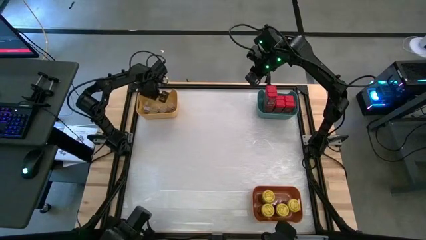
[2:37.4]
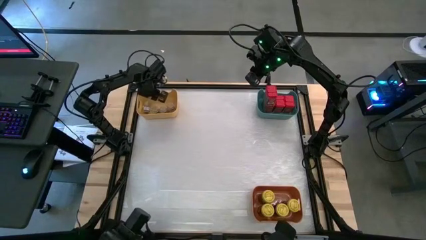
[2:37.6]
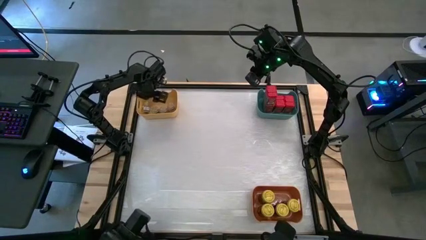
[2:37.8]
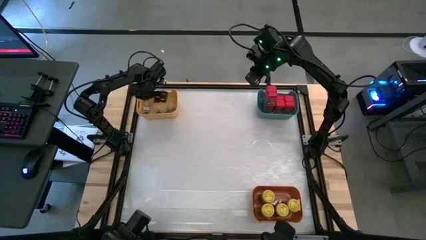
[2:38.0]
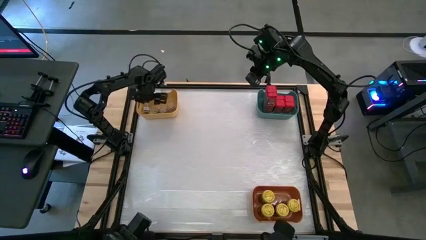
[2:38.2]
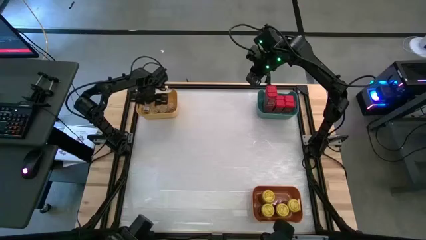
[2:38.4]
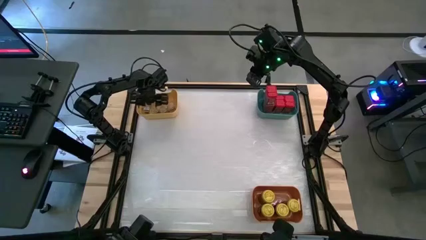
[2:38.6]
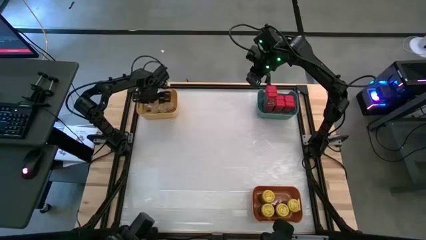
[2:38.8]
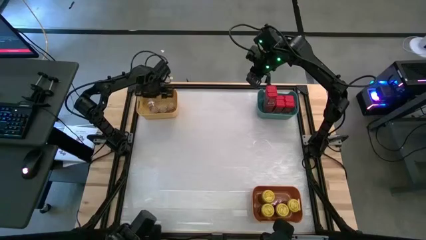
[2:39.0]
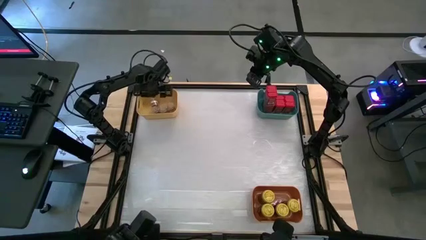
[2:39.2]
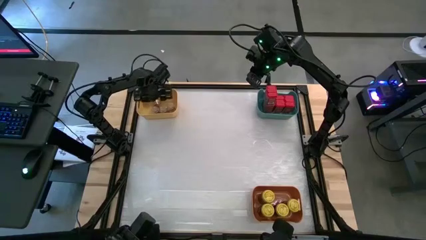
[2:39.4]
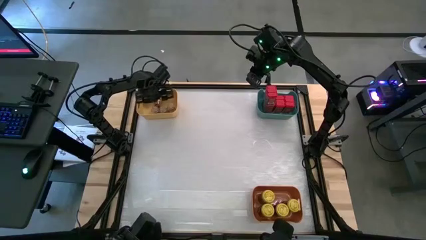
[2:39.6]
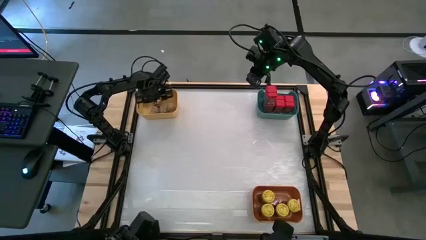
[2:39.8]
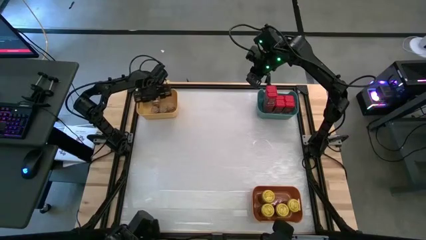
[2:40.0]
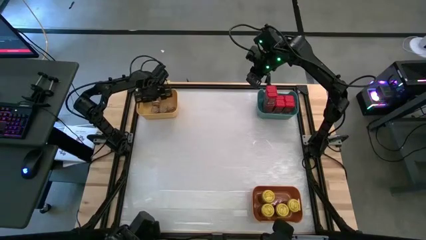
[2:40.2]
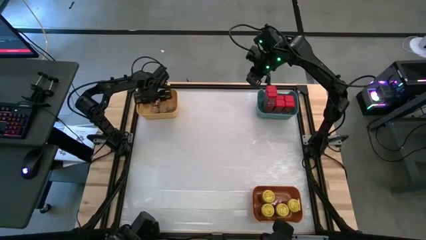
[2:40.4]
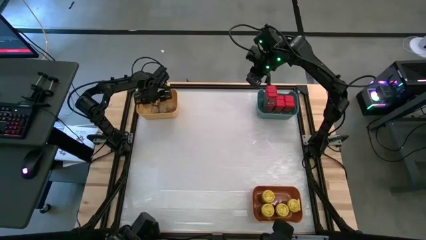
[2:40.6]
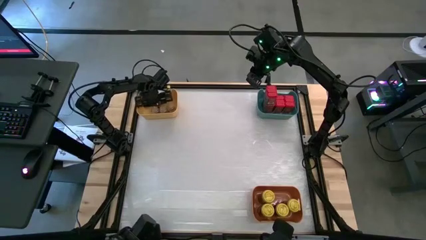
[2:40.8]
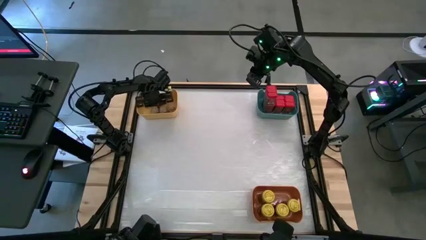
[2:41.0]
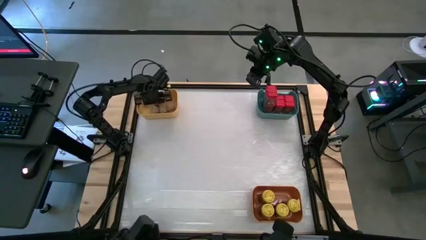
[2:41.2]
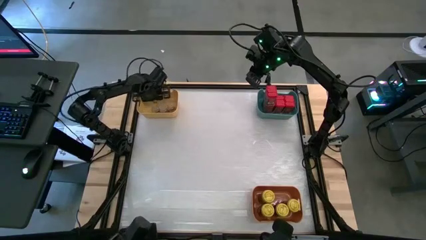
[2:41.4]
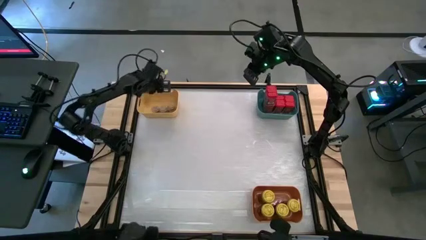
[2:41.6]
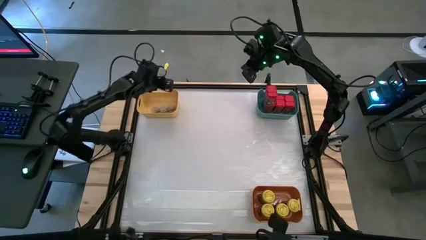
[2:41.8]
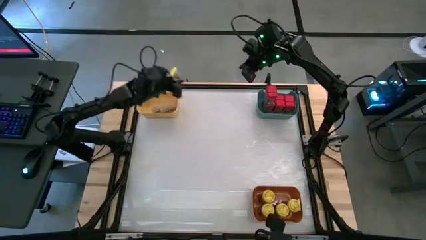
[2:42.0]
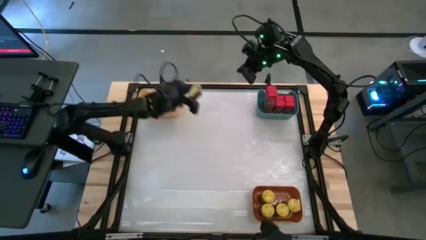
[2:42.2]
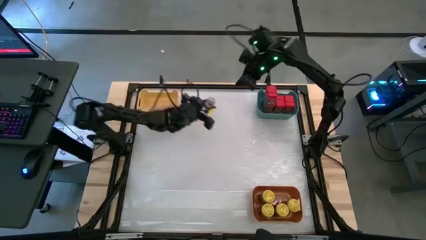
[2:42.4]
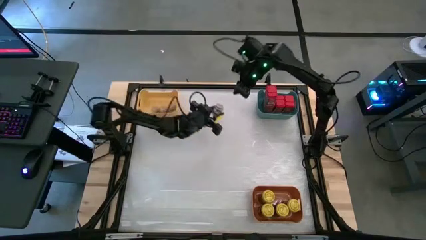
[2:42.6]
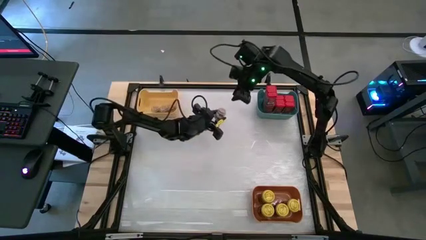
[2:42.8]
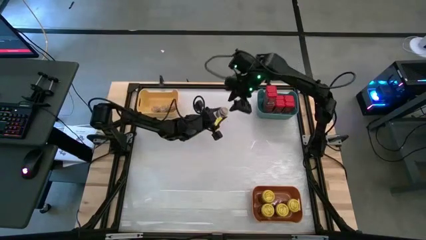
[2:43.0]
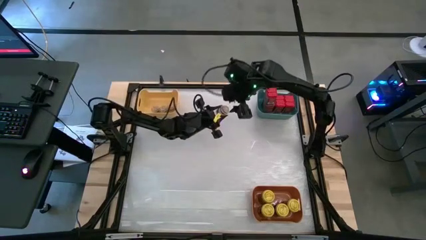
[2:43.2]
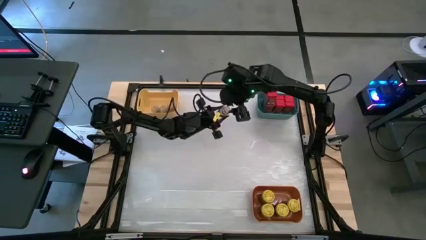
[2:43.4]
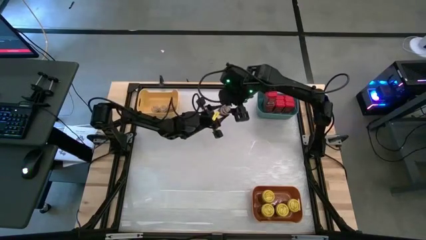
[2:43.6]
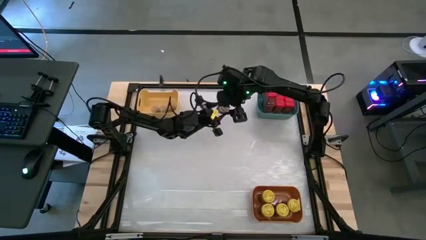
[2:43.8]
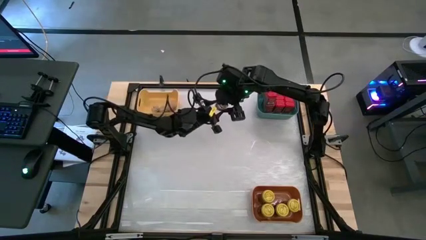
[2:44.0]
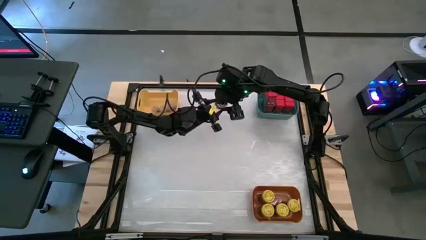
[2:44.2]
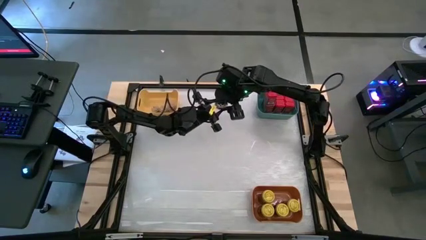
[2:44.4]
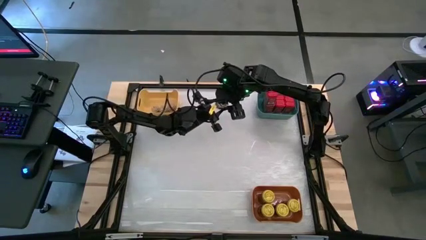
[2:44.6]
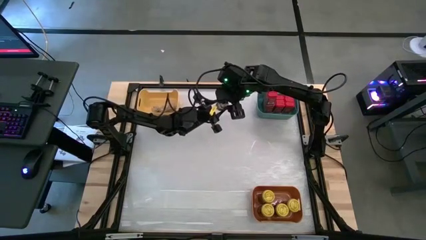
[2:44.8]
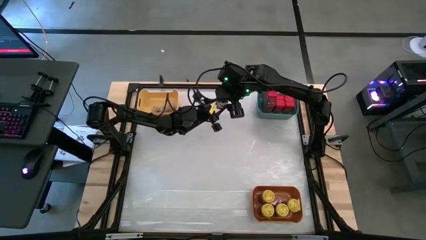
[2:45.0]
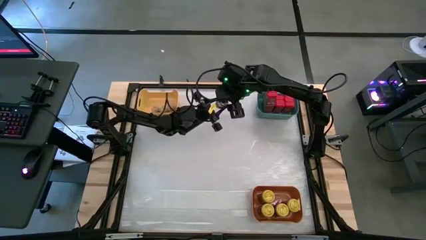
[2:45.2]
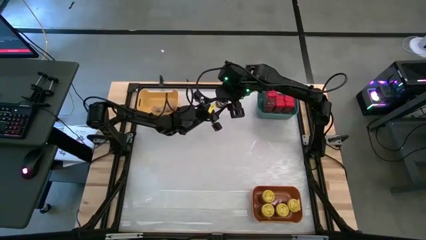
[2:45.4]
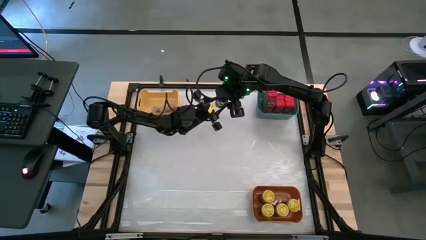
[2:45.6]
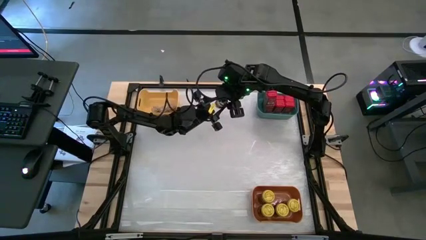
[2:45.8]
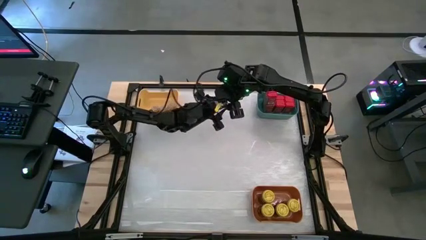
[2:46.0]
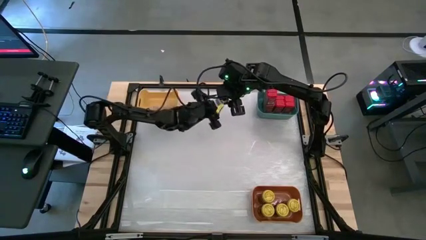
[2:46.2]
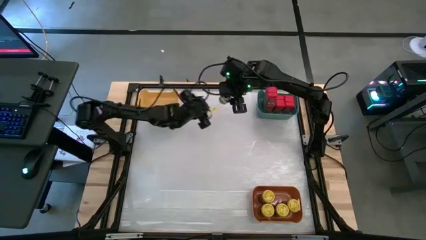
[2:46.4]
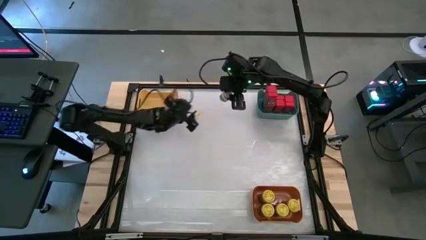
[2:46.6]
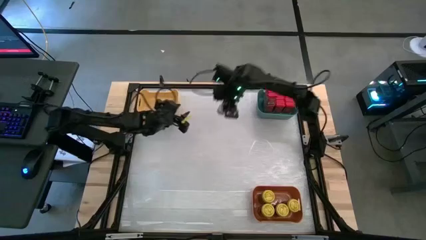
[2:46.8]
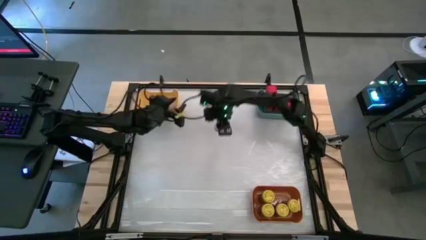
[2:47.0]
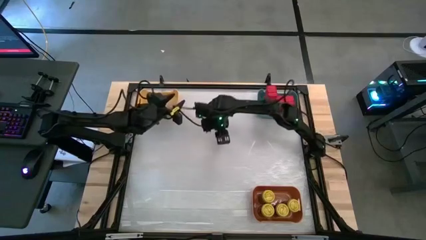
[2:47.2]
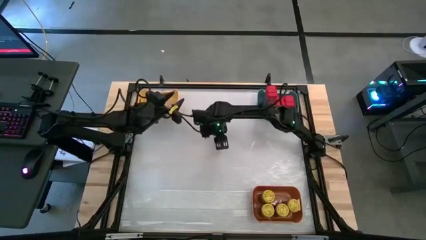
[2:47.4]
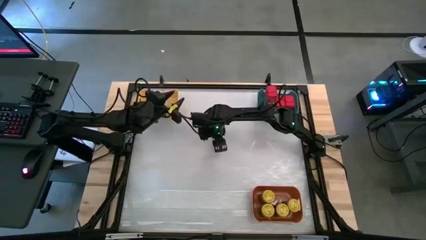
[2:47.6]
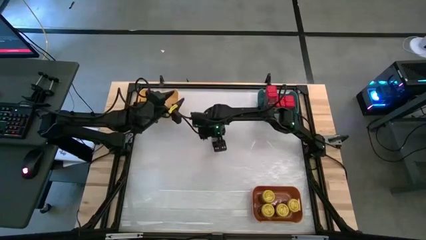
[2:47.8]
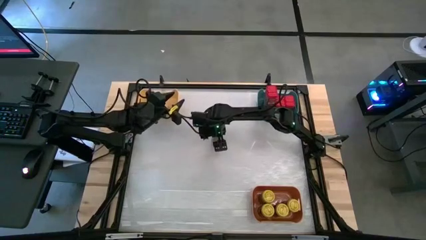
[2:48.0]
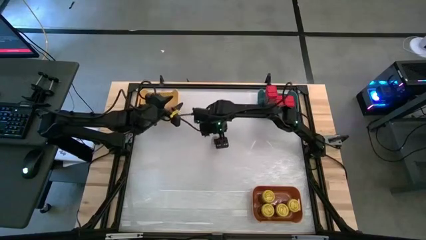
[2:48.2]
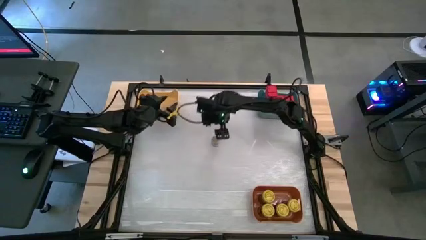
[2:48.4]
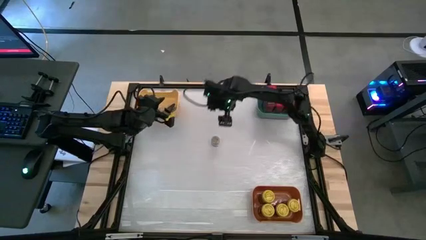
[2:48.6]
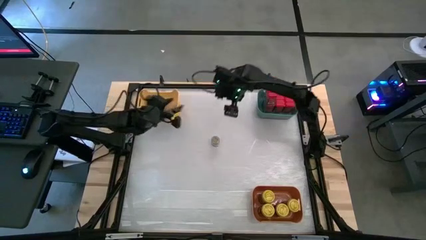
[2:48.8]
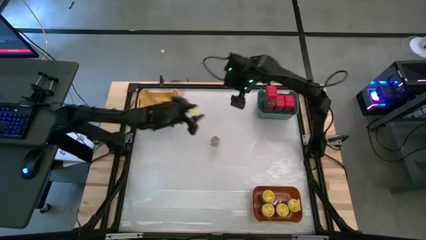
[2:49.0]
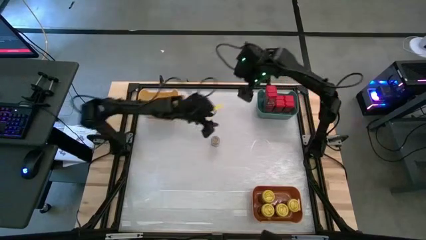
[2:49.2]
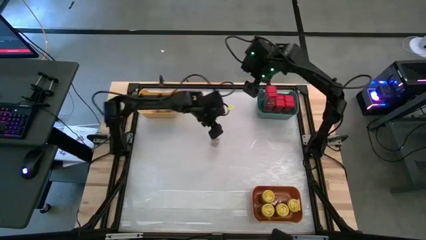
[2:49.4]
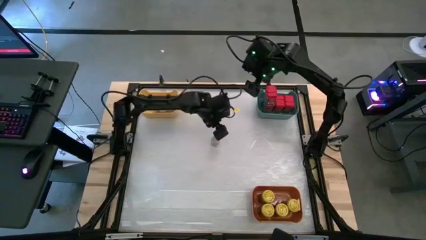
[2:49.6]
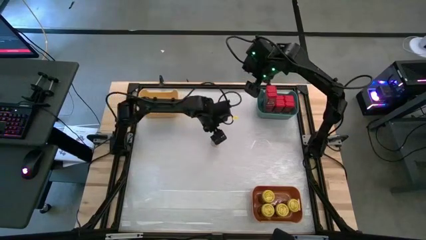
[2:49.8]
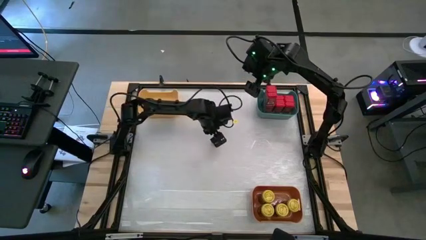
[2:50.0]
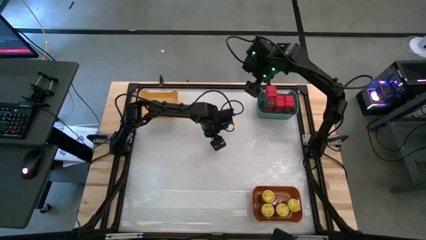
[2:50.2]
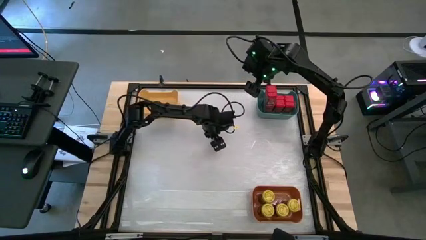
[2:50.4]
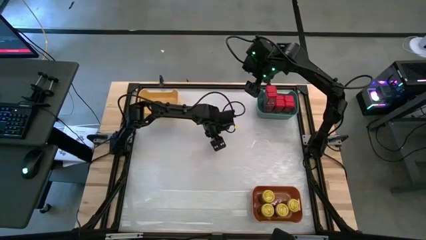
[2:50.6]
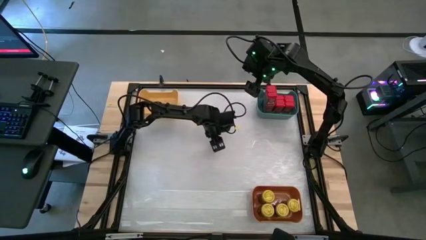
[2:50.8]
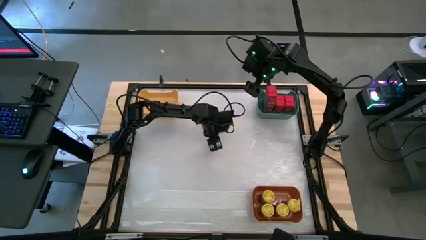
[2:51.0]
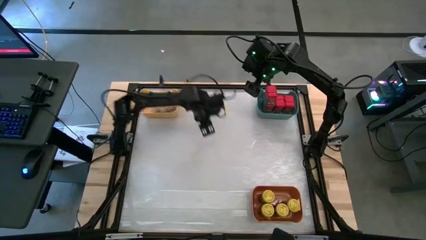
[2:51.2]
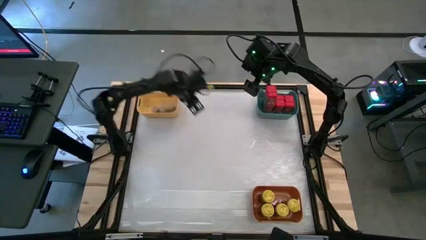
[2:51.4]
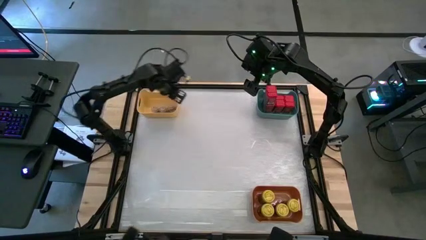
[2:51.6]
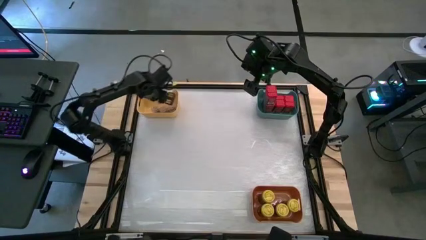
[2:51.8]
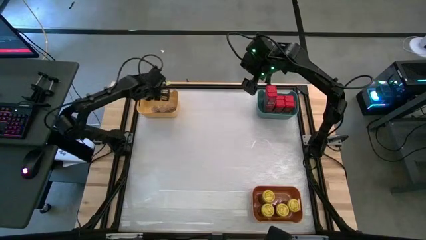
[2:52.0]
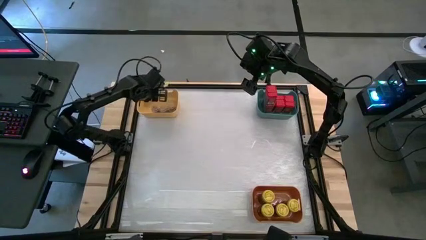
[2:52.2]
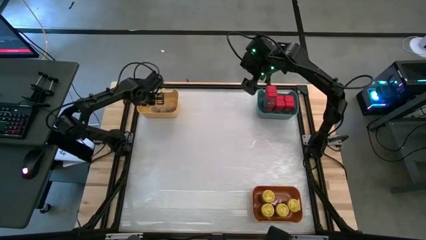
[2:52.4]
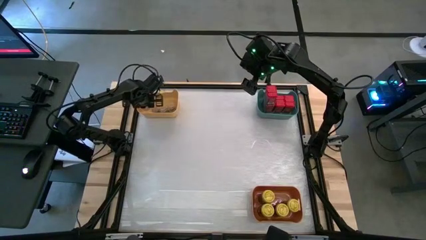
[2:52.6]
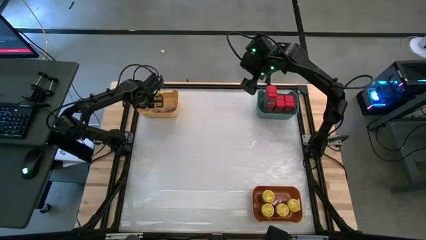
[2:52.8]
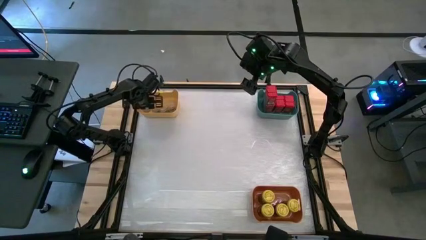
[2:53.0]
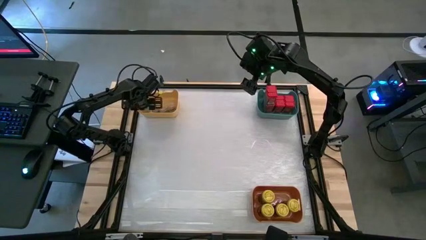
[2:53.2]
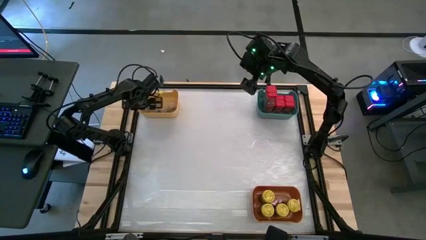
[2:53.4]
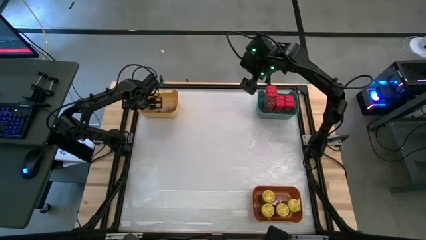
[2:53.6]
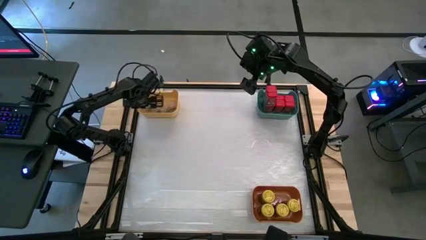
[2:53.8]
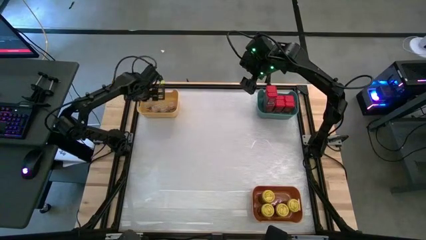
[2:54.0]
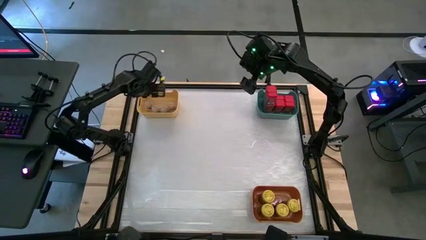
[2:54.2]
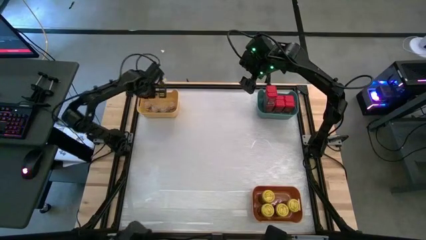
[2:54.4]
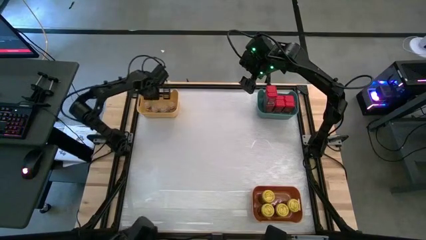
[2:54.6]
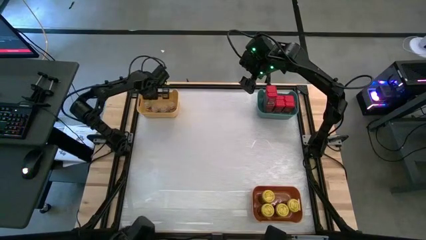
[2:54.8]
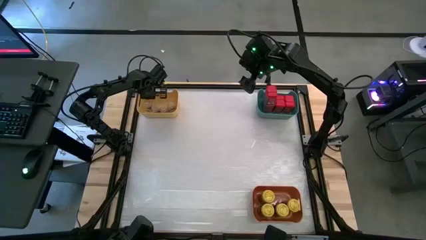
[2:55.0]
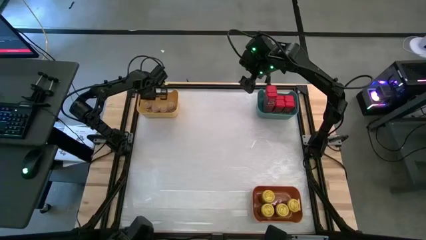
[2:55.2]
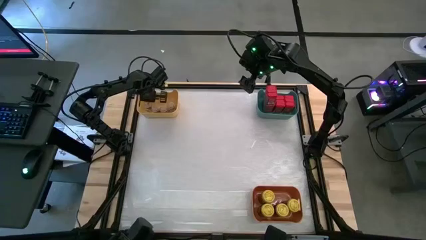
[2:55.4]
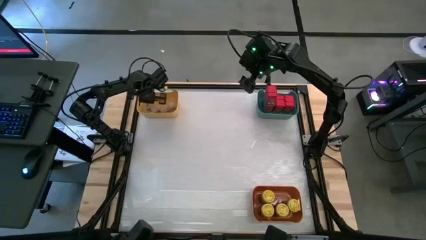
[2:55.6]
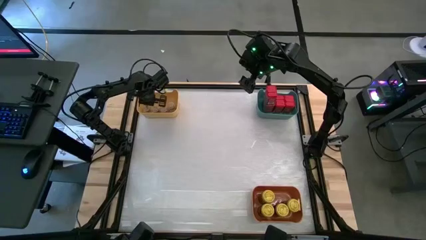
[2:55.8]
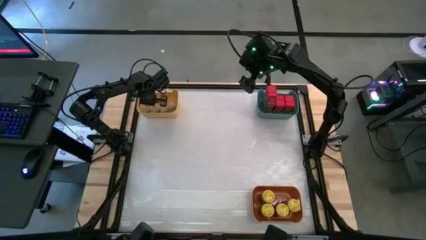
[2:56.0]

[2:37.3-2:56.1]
Task: Sort spices by type
Put the brown seasoning bottle into the yellow bin
